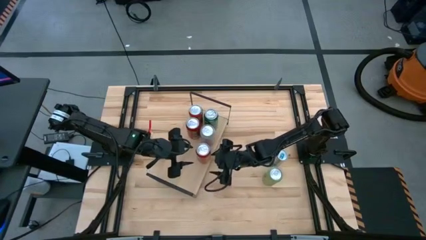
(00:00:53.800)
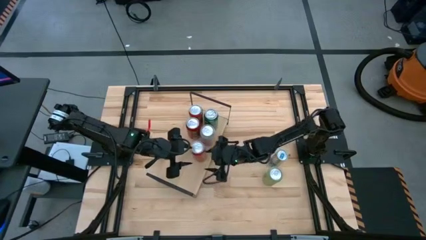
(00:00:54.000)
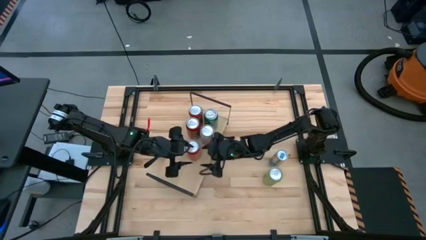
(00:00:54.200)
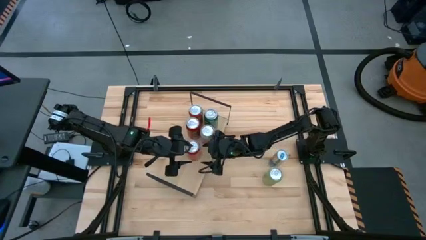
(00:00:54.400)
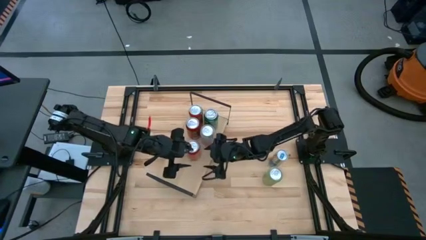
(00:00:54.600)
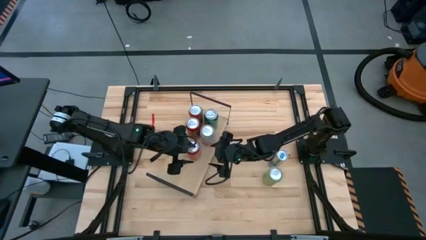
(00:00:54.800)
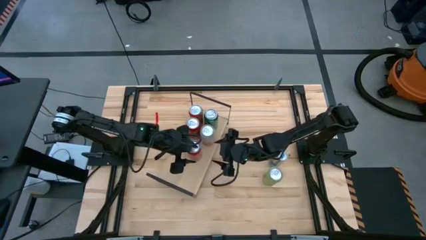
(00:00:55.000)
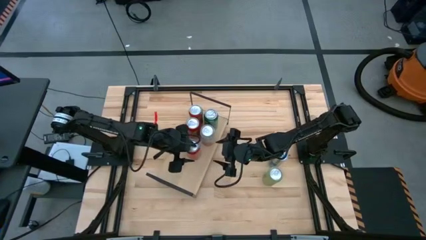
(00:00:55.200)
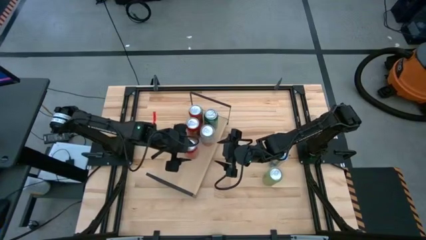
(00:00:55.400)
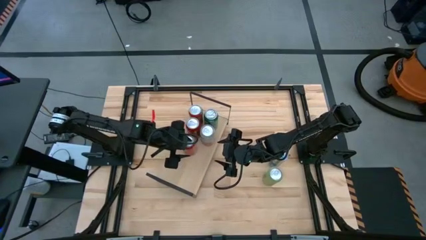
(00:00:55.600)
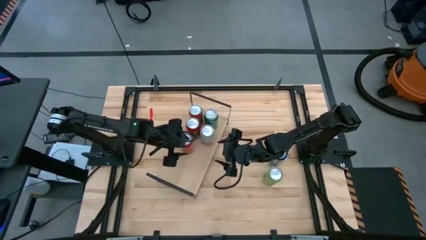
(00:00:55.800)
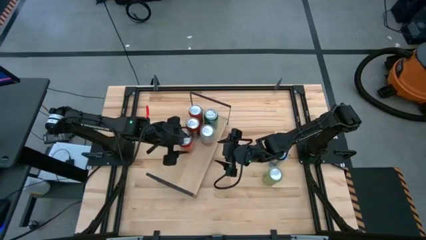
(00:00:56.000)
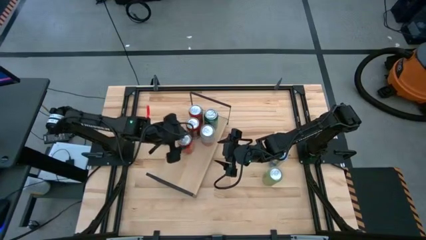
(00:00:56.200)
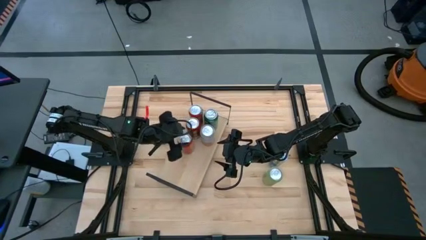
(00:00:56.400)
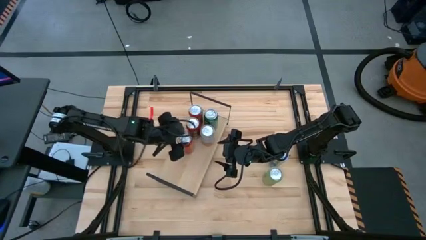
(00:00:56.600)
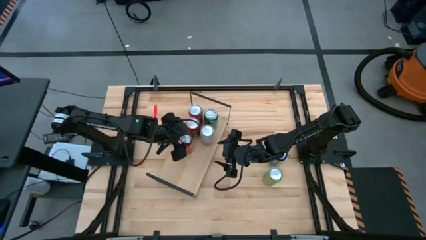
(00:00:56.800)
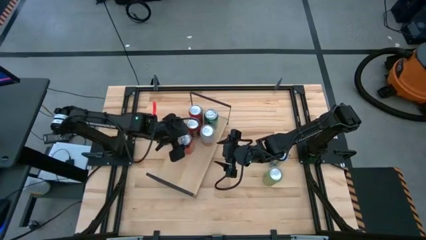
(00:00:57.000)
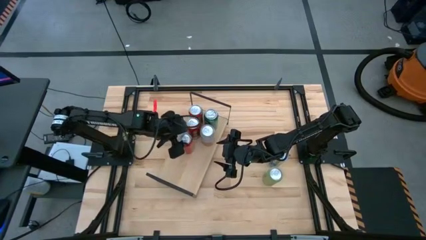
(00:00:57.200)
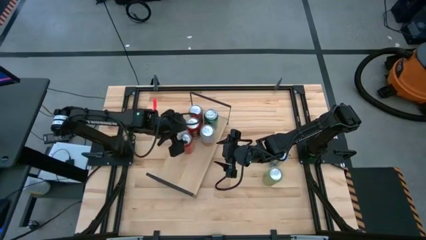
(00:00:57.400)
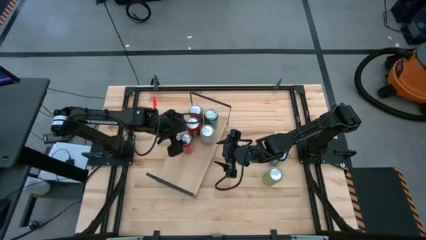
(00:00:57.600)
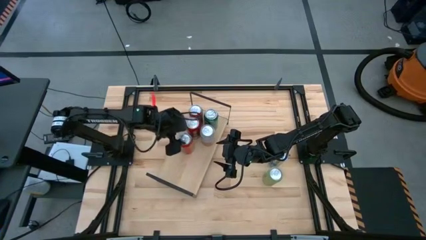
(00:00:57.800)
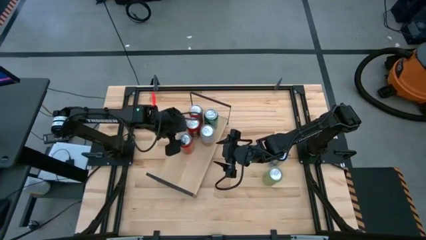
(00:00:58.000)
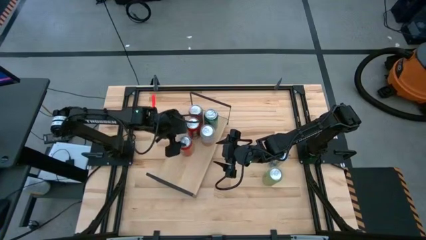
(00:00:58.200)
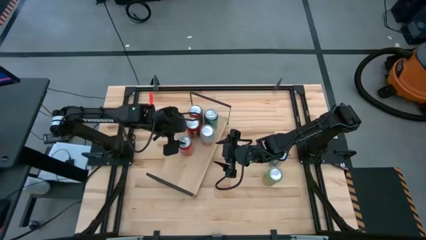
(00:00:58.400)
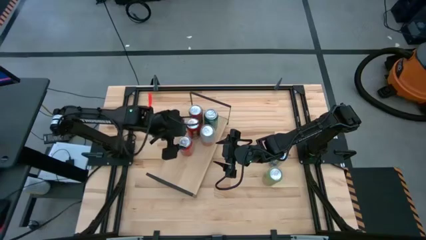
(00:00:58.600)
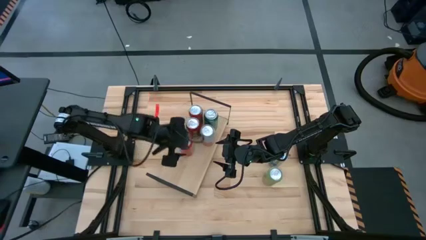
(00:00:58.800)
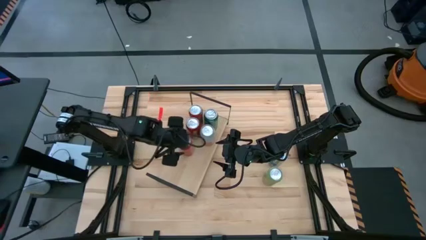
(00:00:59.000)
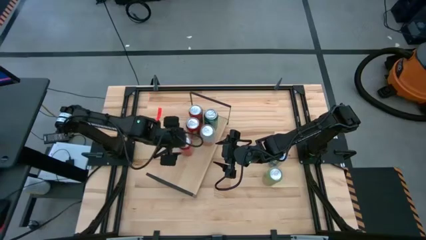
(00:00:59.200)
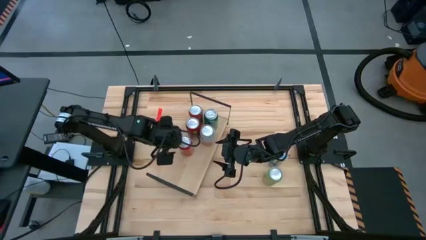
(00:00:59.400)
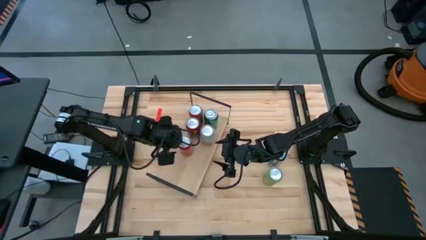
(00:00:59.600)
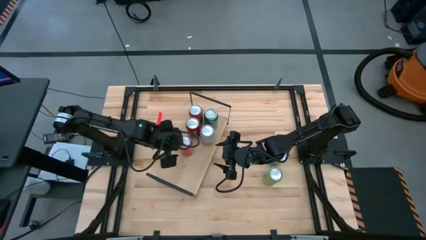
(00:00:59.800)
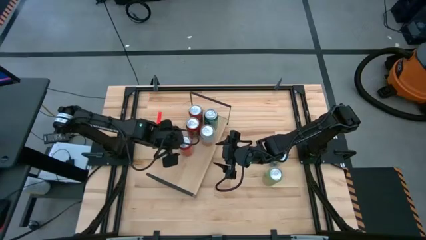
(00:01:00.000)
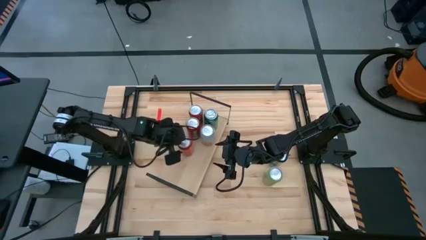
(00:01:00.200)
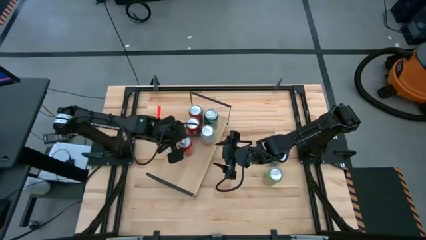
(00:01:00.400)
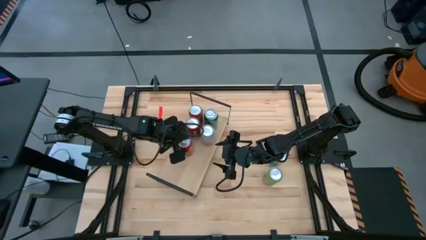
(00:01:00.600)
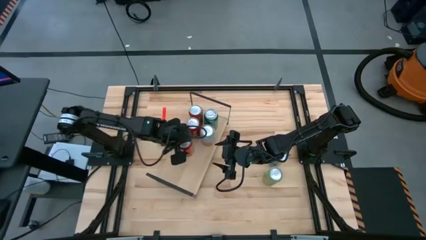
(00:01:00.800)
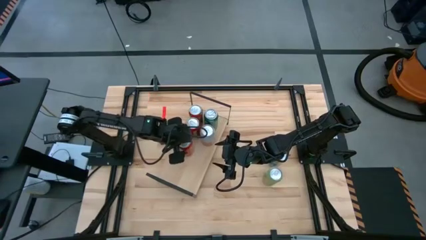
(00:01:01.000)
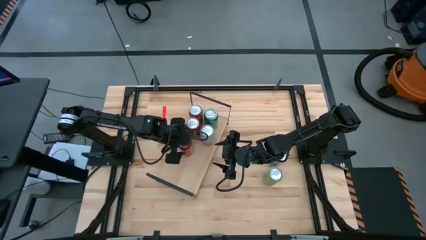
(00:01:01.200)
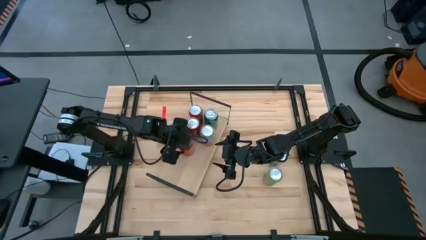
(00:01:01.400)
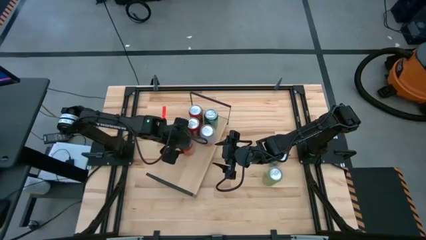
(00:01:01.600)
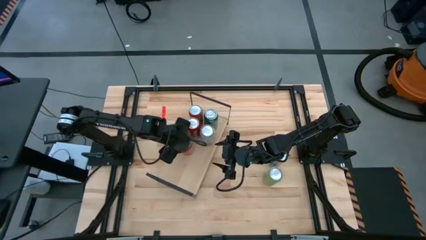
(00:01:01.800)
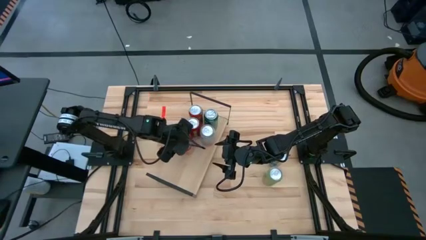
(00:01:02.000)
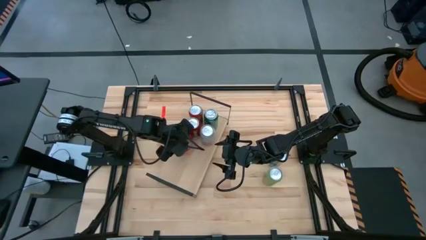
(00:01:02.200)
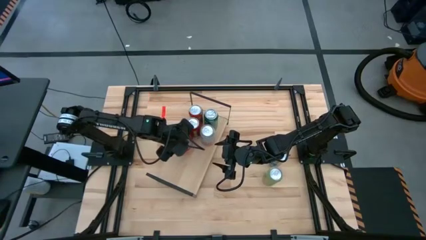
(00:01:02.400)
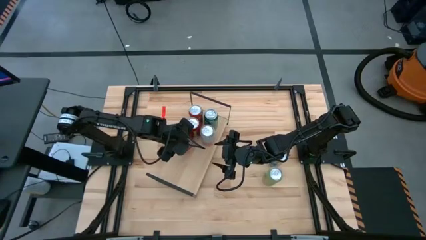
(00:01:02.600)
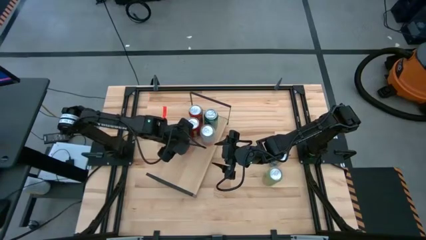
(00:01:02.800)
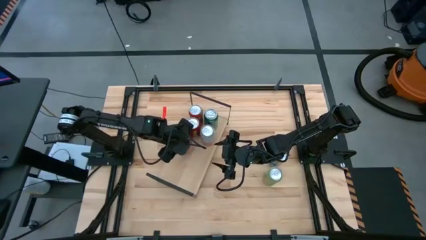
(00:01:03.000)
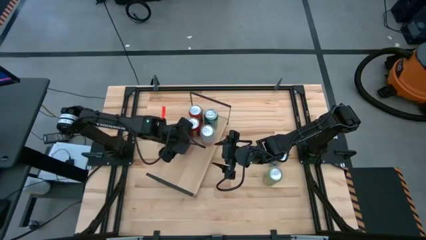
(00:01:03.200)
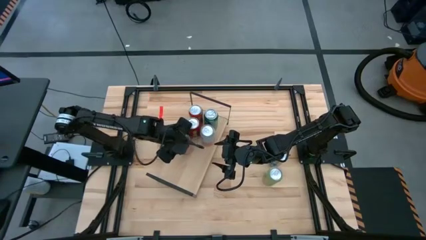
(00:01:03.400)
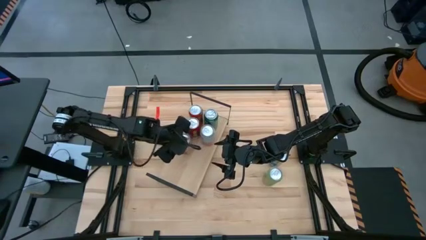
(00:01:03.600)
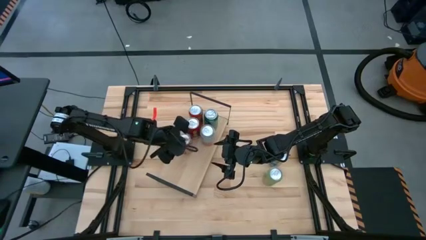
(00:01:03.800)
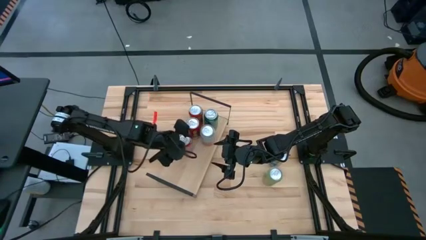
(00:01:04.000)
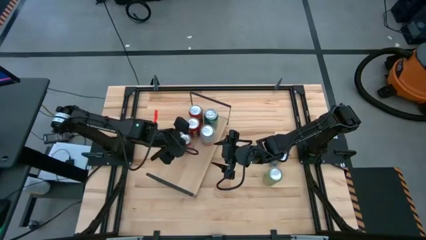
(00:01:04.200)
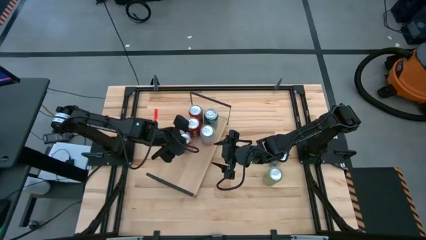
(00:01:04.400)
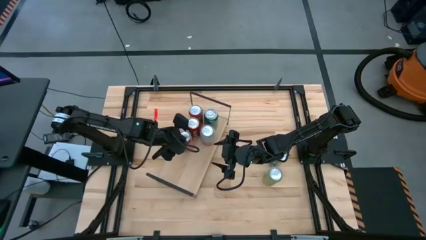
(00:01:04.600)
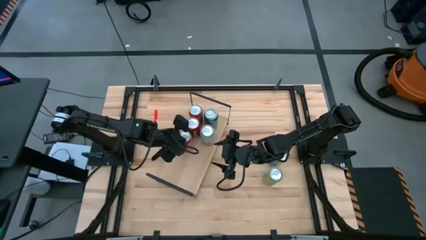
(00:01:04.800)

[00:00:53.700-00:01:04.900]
Task: Place canned beverage on shelf
Put the orange soda can on the shelf
